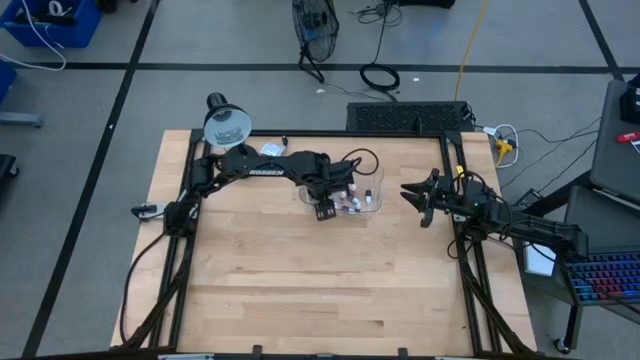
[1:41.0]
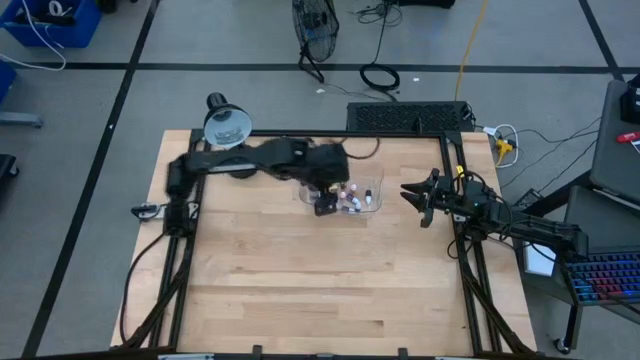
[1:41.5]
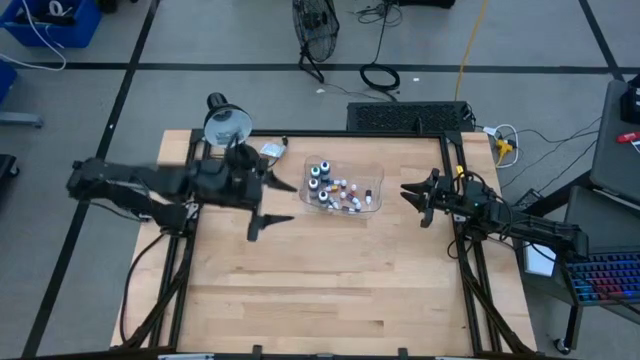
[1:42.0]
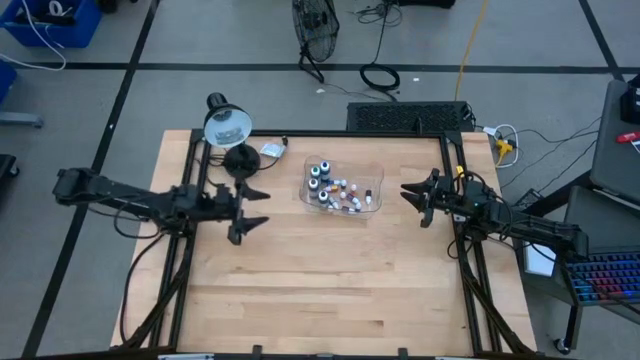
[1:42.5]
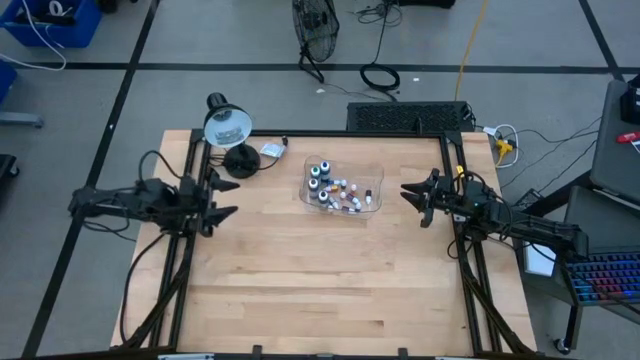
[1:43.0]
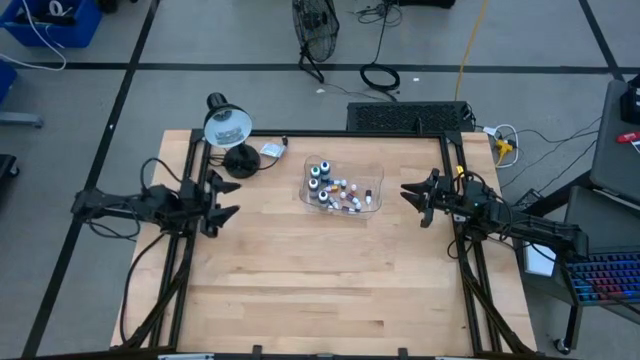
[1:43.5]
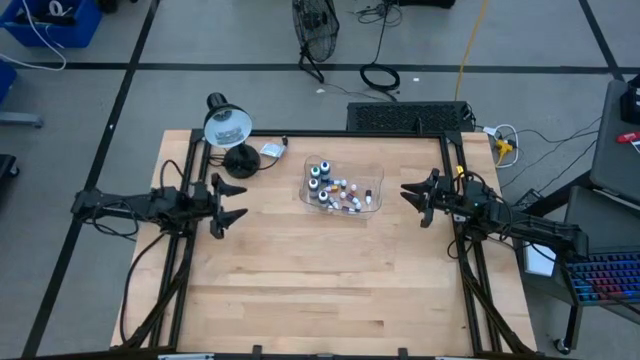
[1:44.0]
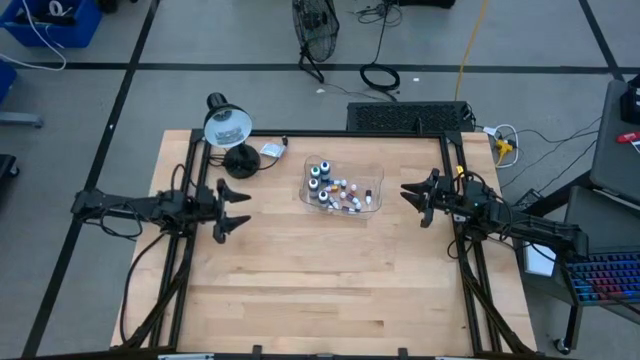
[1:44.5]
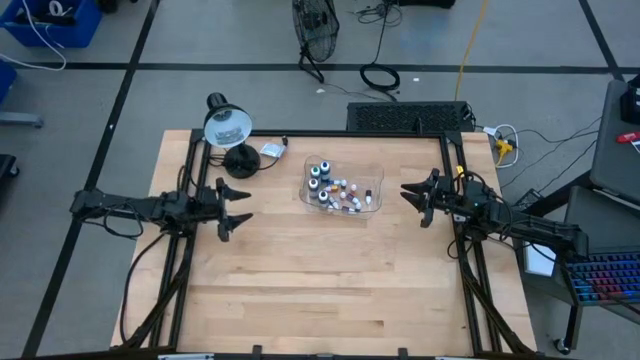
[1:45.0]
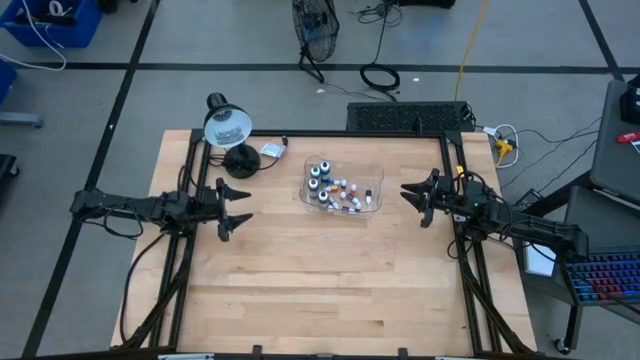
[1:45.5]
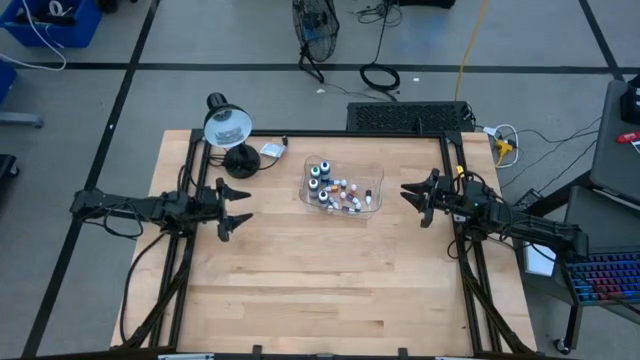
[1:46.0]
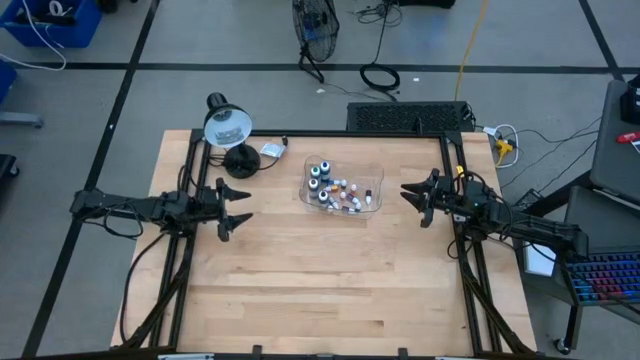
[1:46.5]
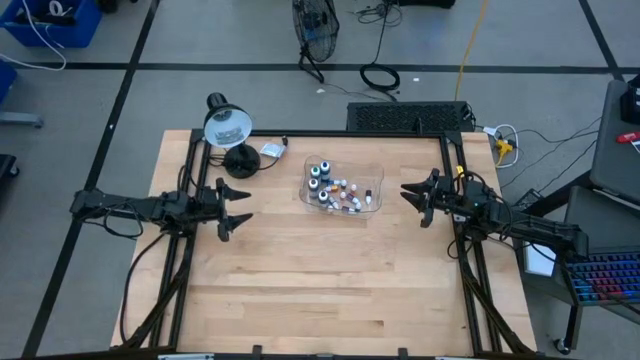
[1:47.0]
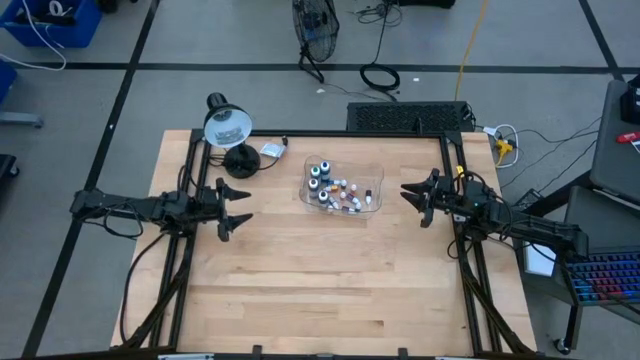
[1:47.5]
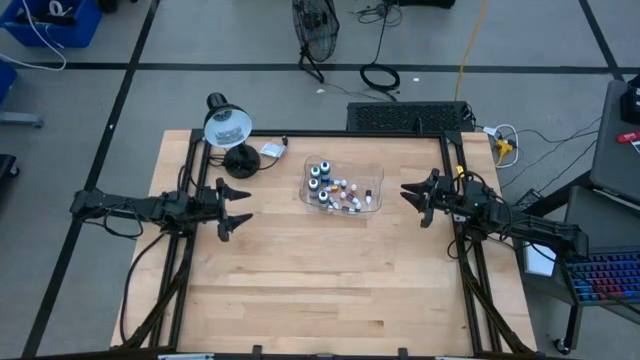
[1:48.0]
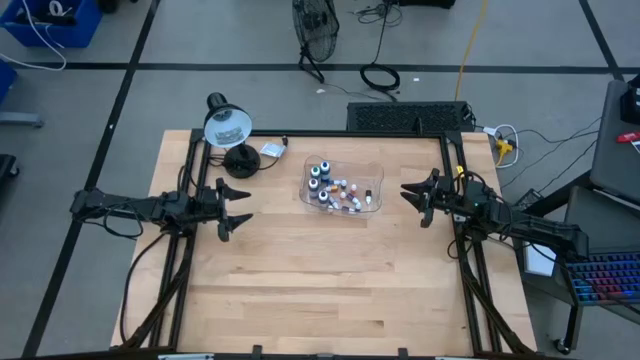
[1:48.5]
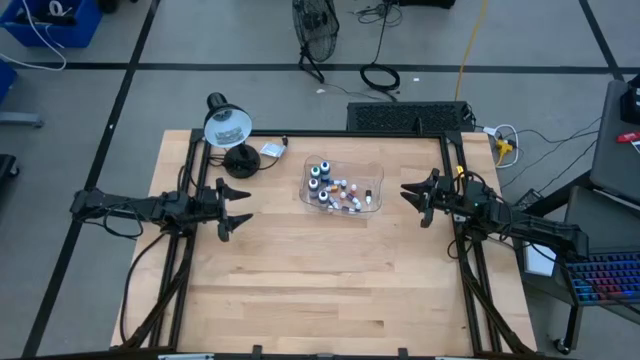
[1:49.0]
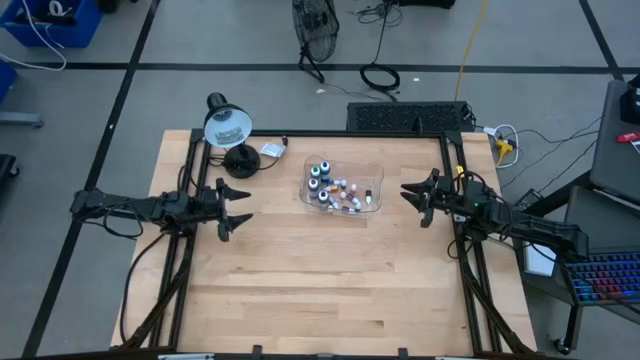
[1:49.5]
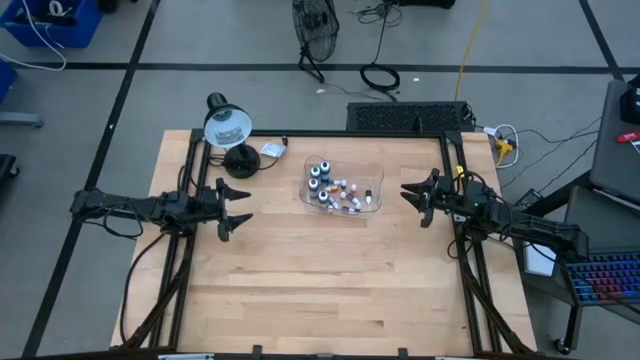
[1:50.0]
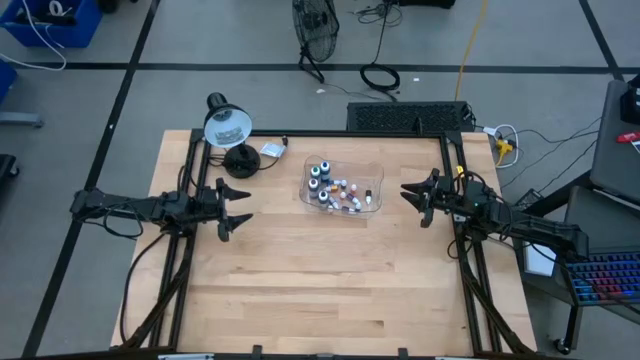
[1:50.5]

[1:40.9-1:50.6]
Task: Pick & Place food coloring
Return to Home Position

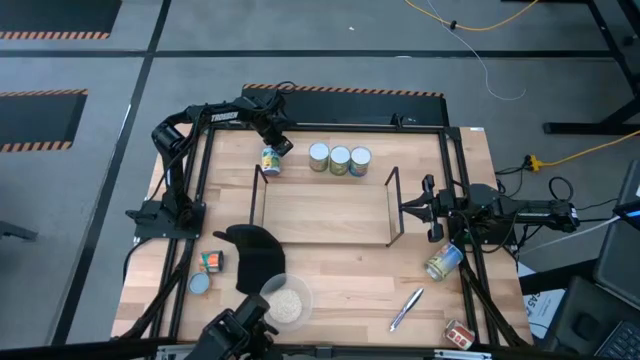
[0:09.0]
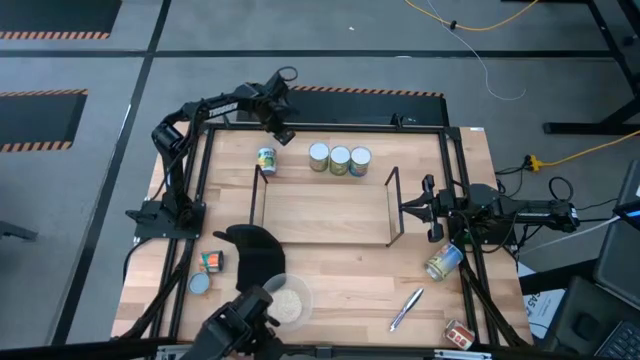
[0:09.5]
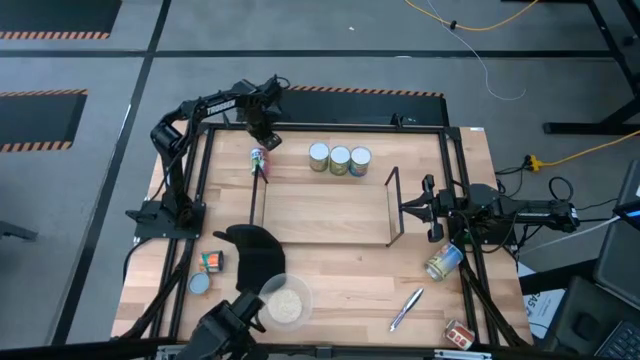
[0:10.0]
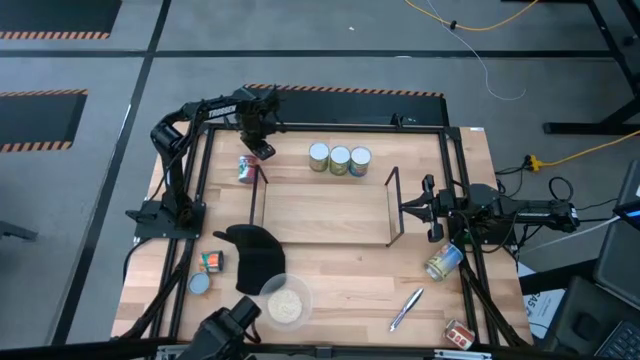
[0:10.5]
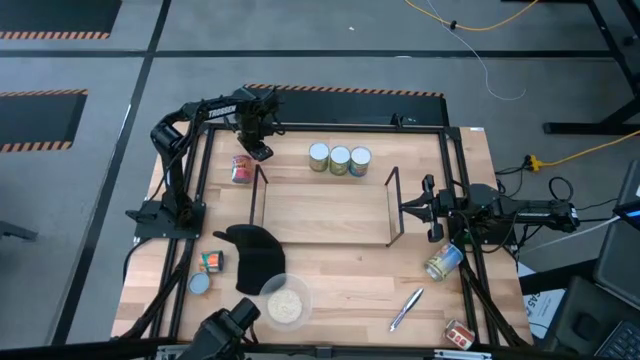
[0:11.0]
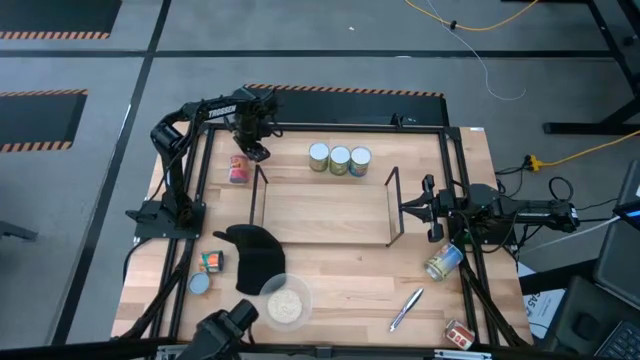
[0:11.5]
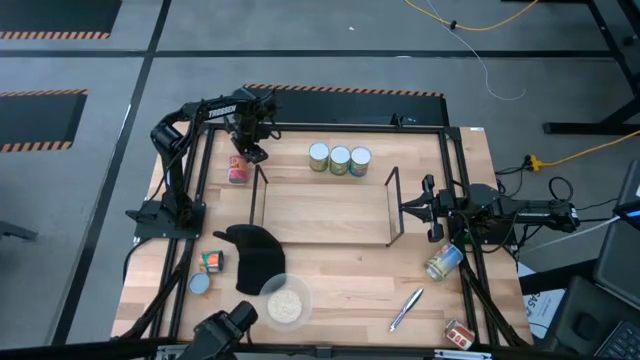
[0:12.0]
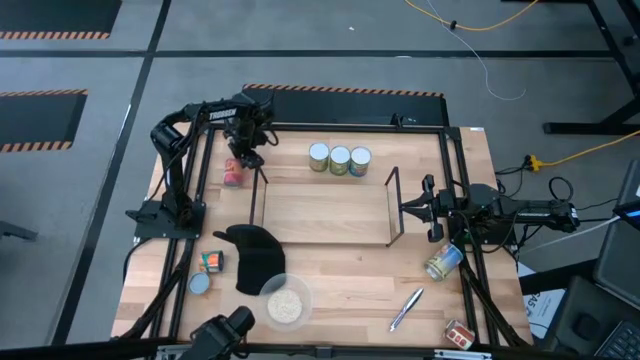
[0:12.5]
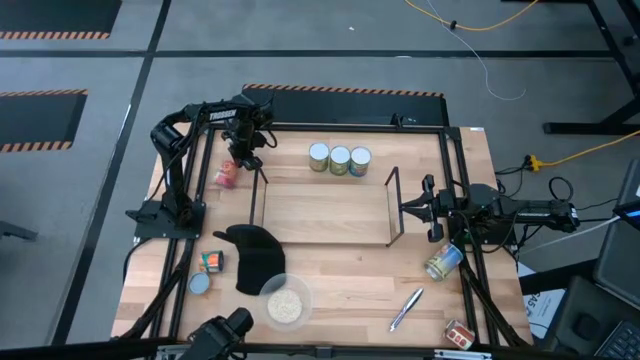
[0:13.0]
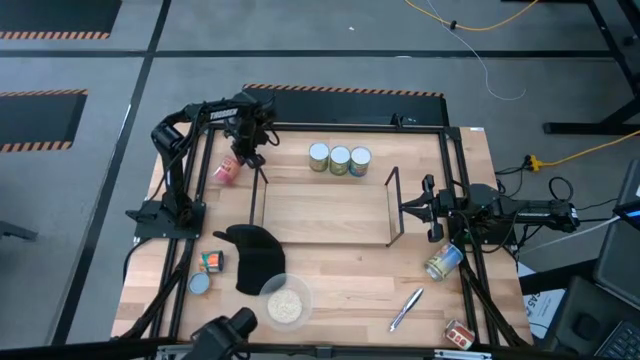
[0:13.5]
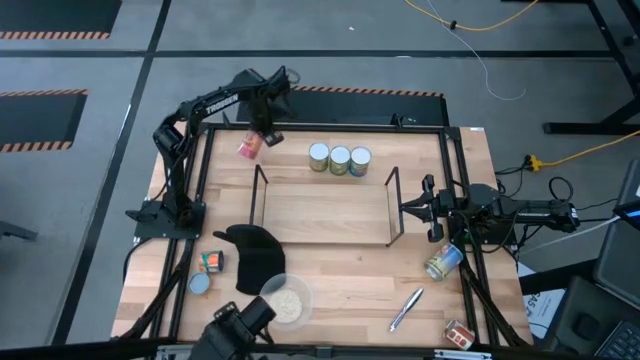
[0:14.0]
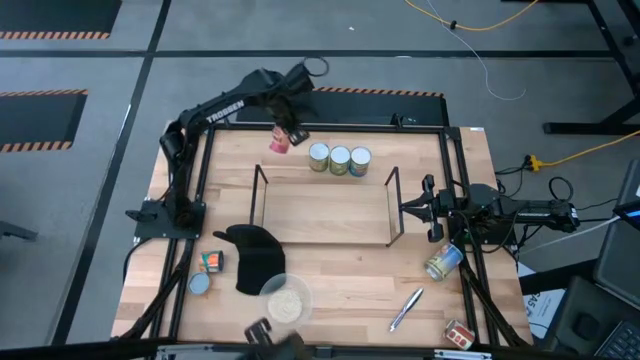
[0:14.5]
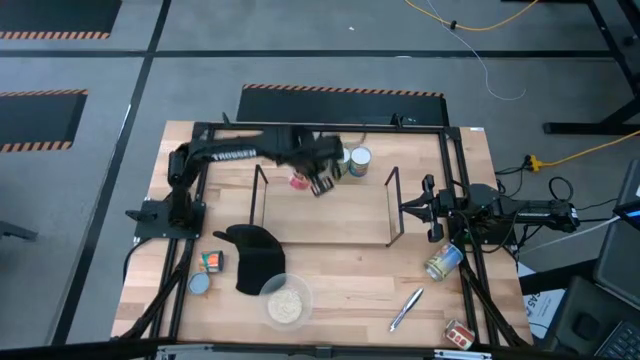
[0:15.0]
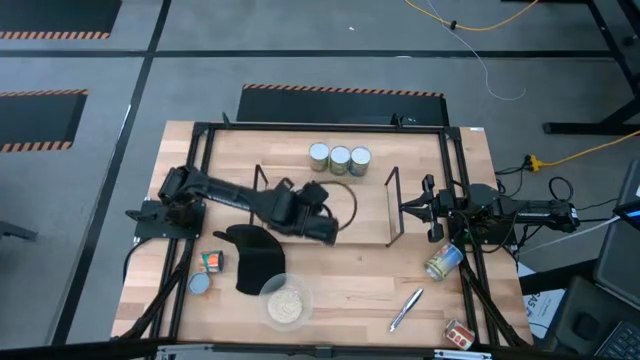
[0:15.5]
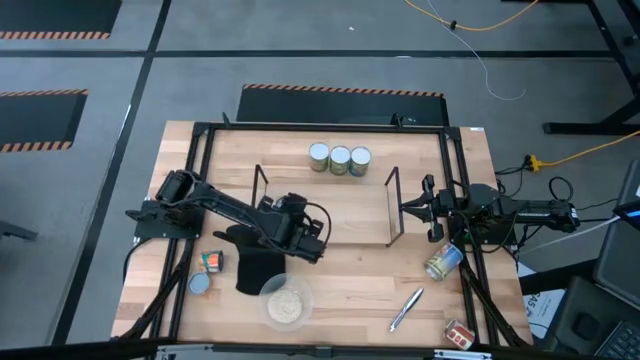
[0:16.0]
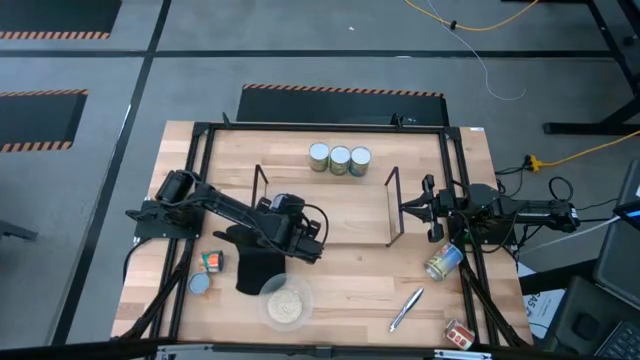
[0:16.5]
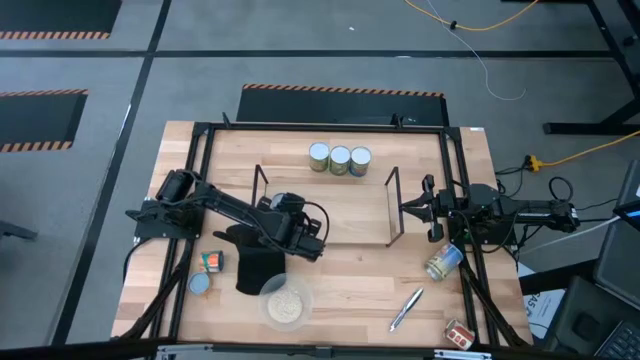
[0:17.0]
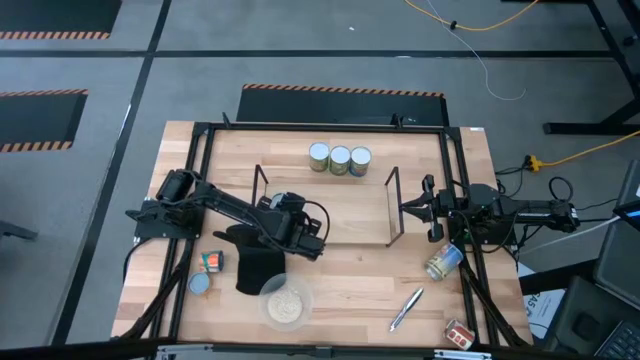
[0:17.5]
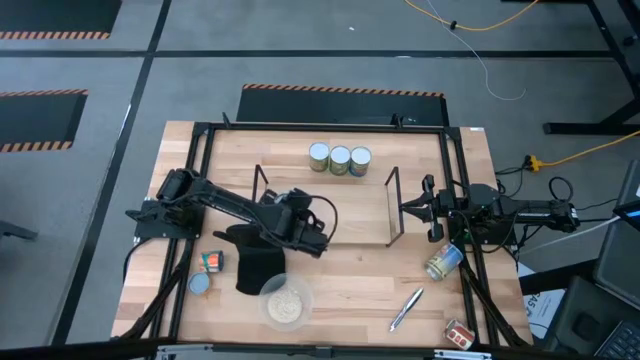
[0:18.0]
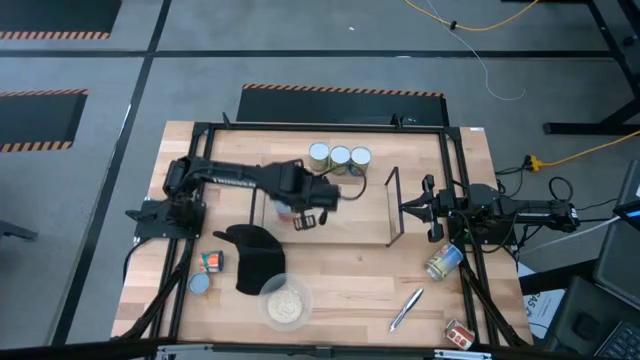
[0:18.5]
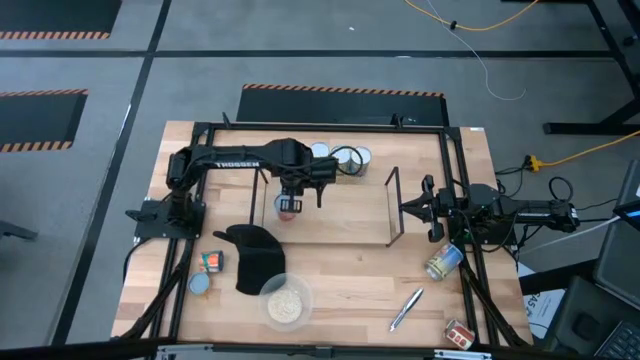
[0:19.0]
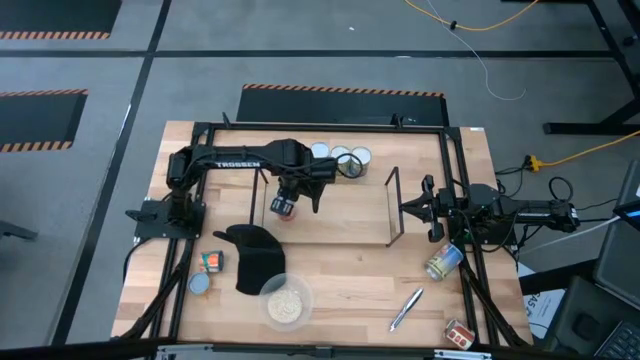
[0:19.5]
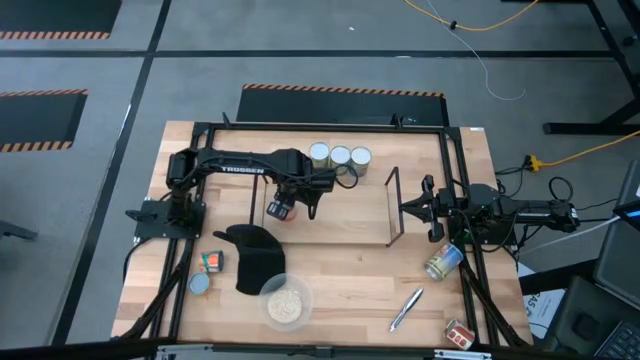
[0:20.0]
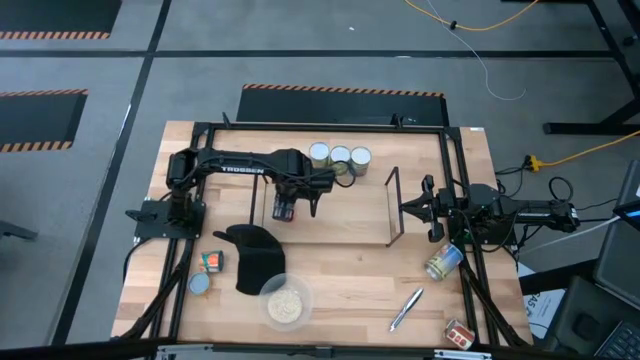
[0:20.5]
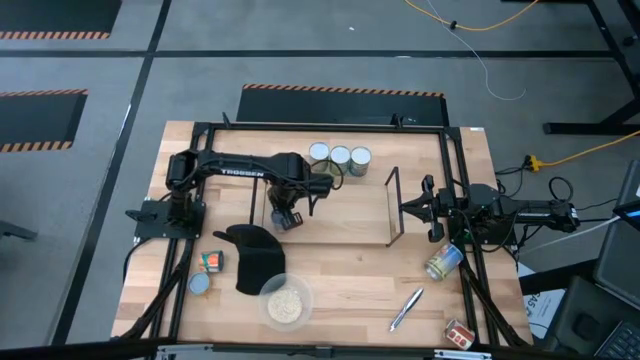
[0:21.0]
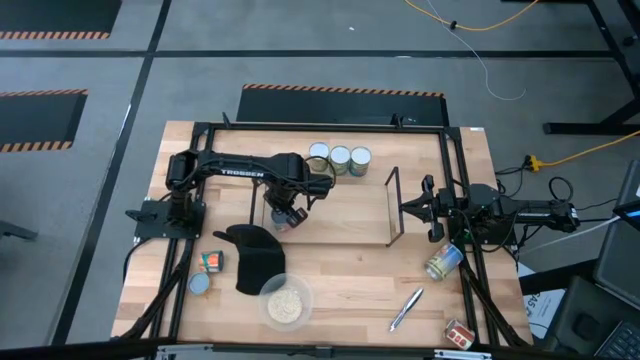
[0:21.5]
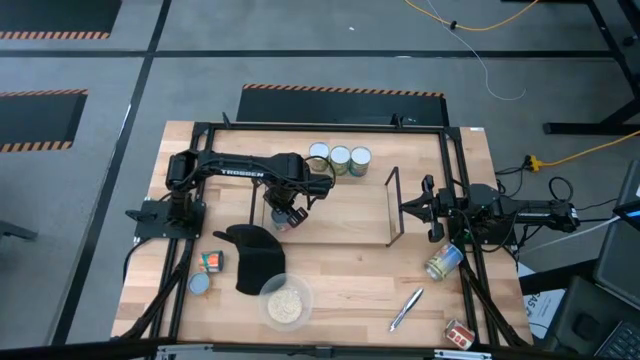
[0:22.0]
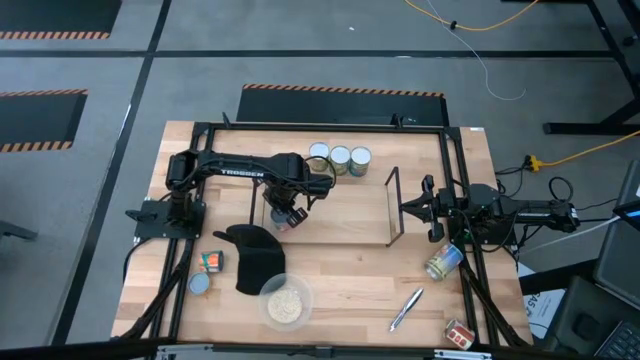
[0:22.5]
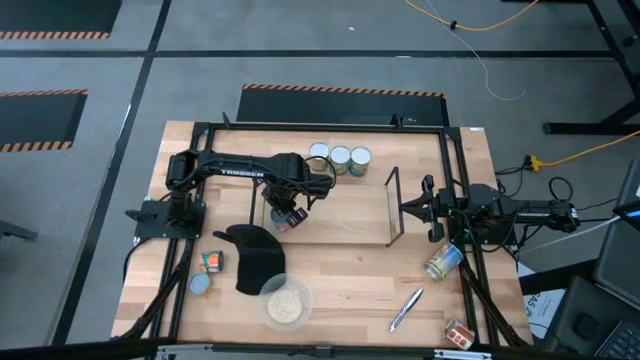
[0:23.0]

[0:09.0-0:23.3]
Task: Pick and place cans onto a shelf
Put the canned mixed fruit on the shelf
